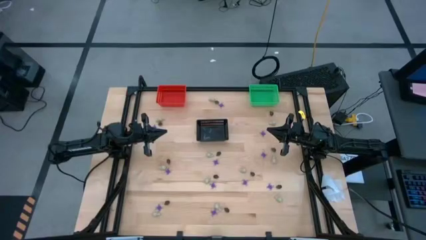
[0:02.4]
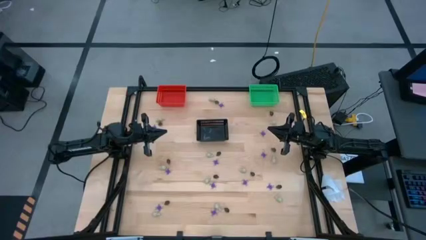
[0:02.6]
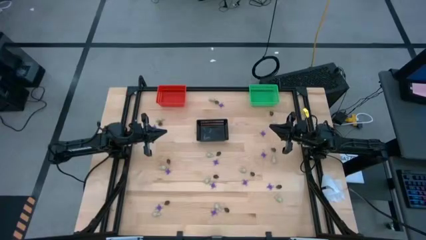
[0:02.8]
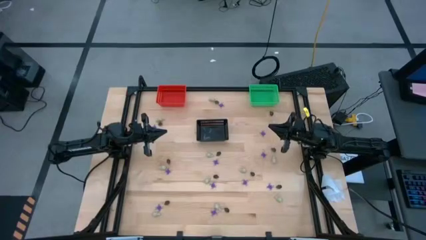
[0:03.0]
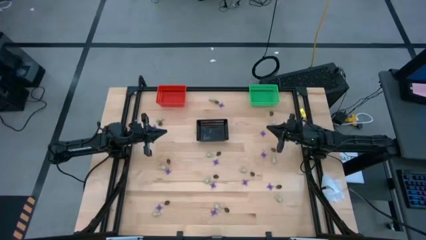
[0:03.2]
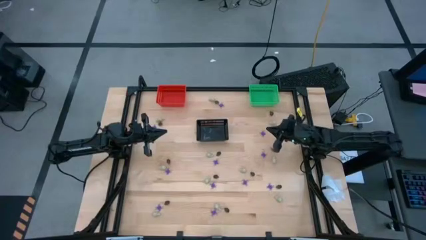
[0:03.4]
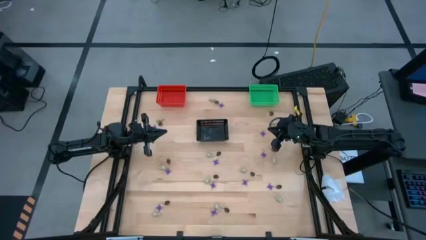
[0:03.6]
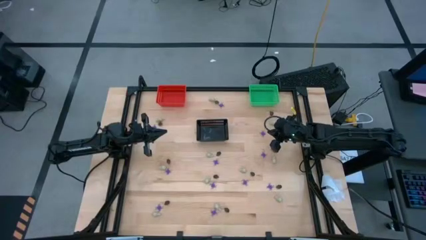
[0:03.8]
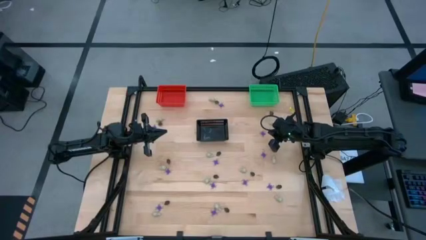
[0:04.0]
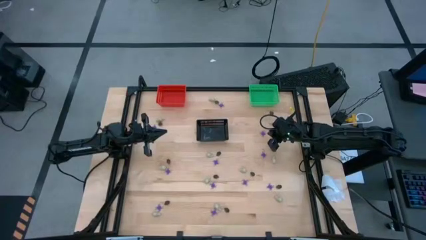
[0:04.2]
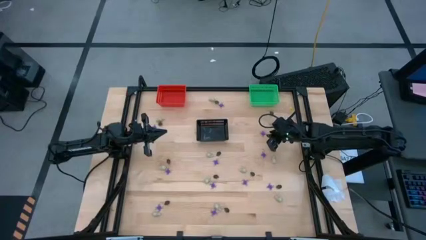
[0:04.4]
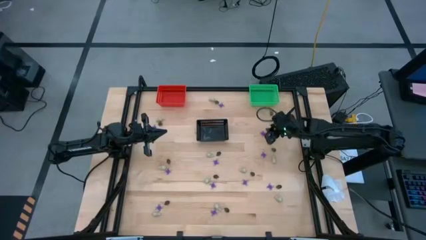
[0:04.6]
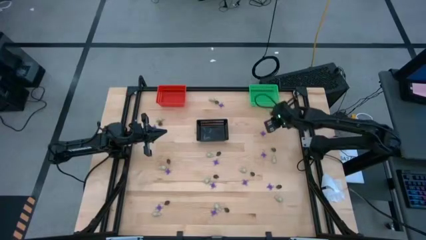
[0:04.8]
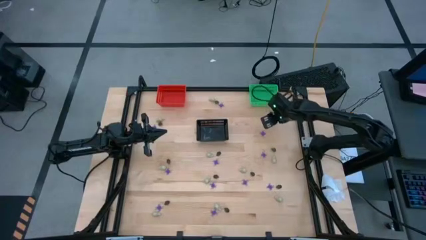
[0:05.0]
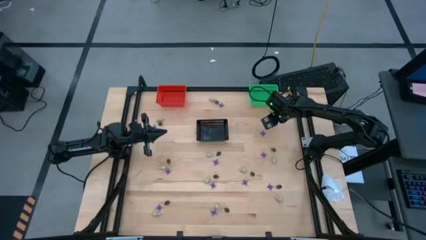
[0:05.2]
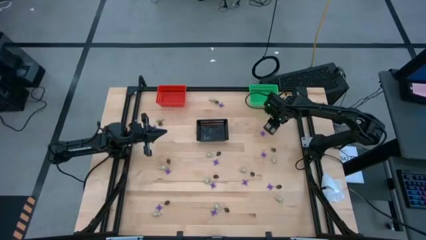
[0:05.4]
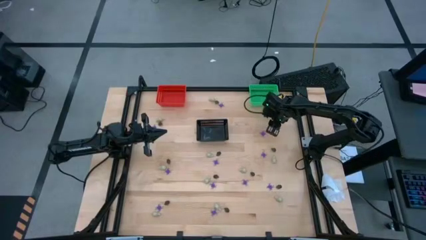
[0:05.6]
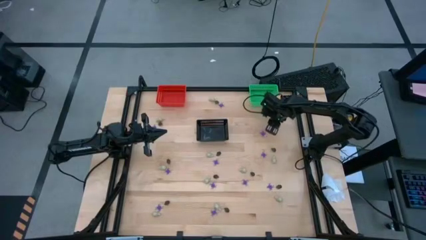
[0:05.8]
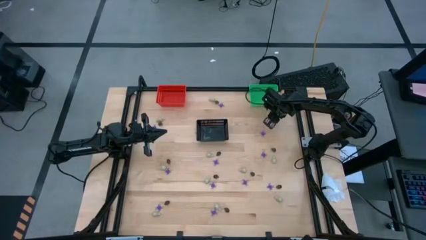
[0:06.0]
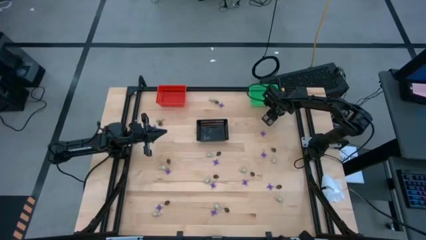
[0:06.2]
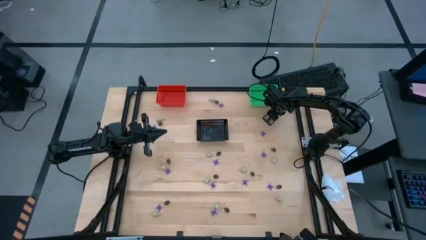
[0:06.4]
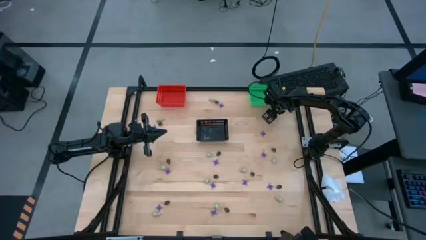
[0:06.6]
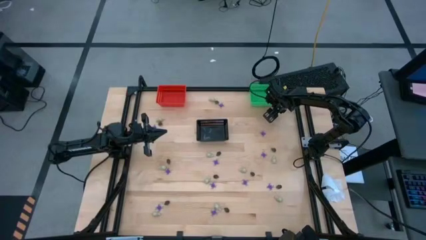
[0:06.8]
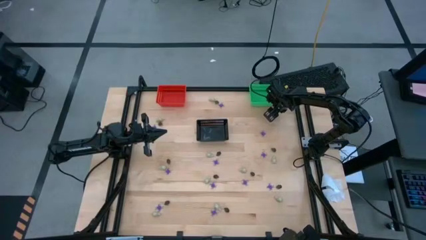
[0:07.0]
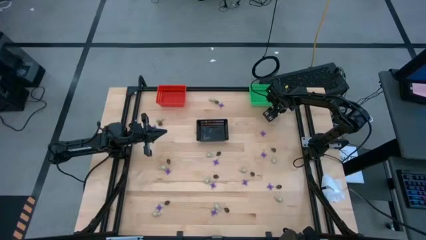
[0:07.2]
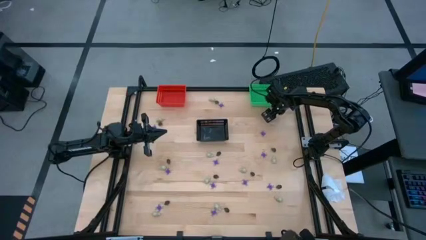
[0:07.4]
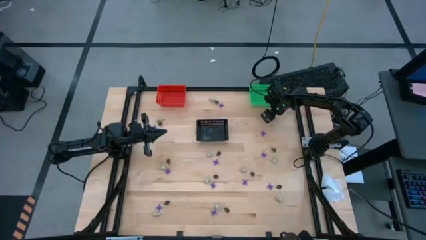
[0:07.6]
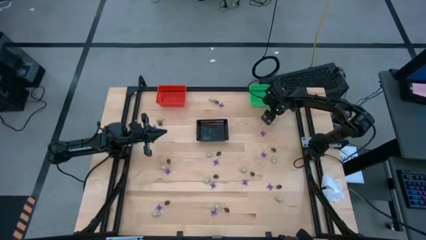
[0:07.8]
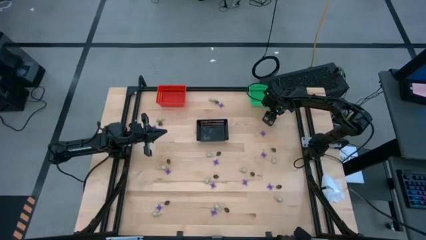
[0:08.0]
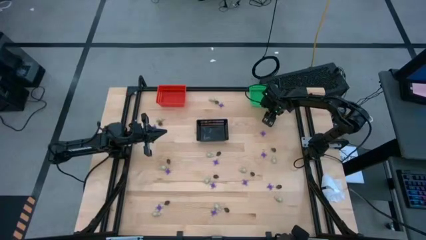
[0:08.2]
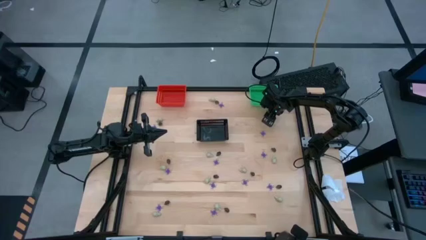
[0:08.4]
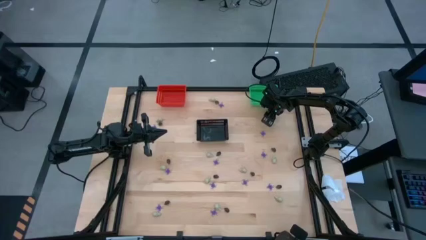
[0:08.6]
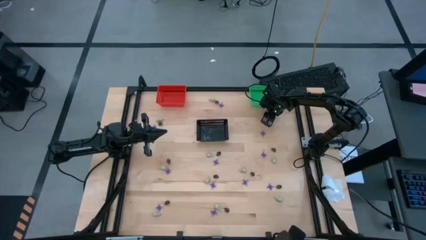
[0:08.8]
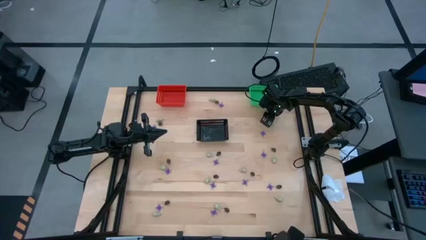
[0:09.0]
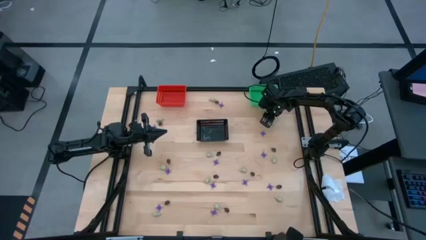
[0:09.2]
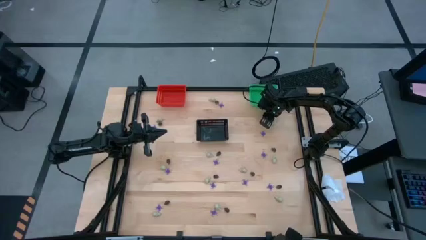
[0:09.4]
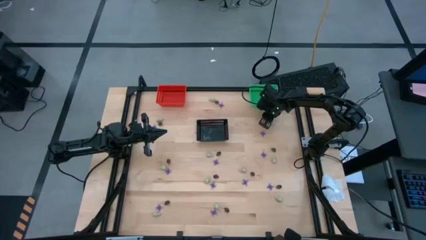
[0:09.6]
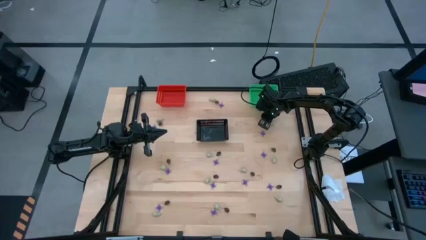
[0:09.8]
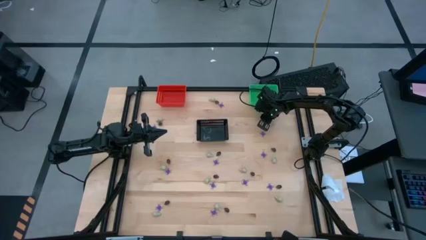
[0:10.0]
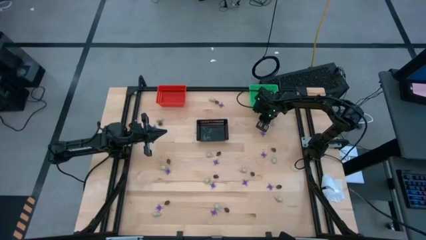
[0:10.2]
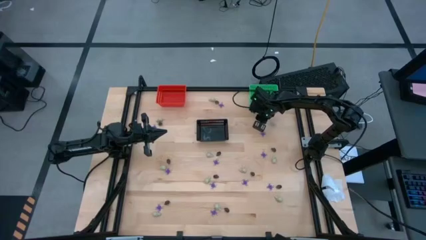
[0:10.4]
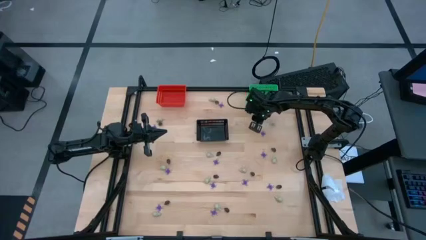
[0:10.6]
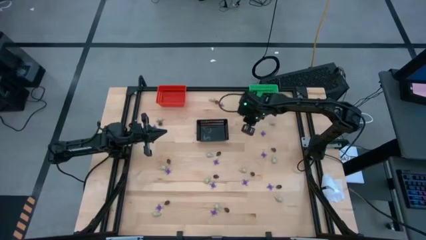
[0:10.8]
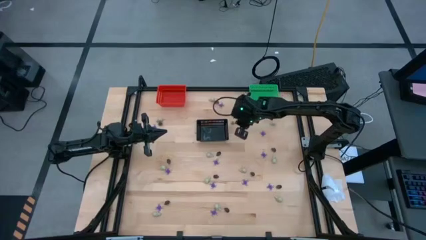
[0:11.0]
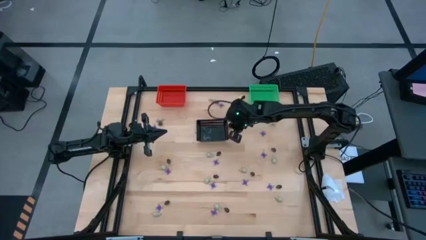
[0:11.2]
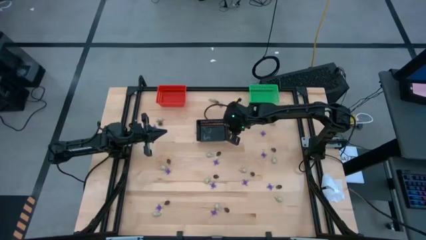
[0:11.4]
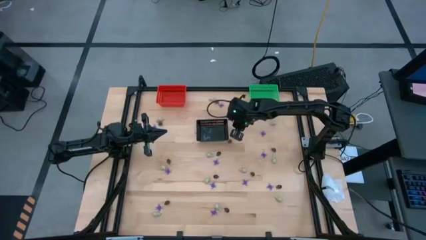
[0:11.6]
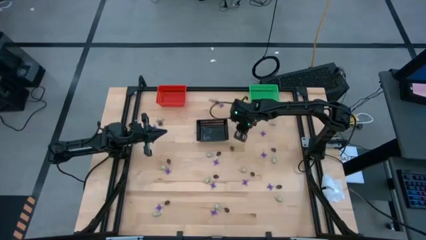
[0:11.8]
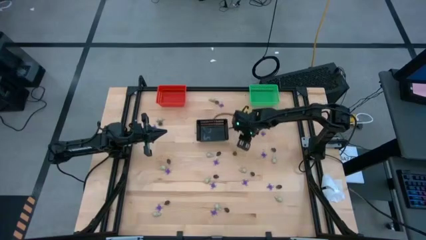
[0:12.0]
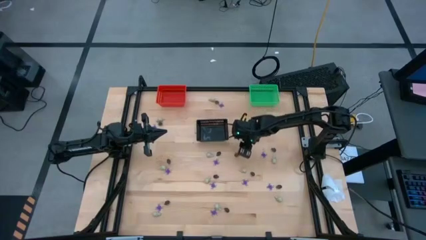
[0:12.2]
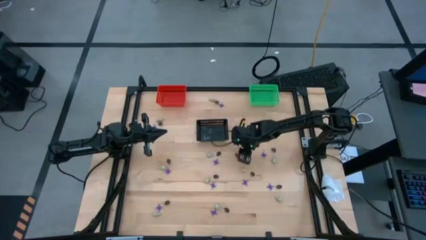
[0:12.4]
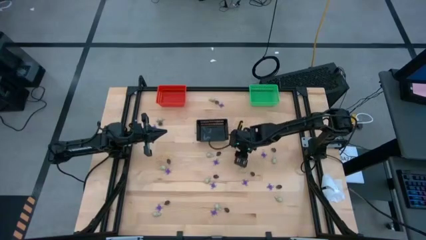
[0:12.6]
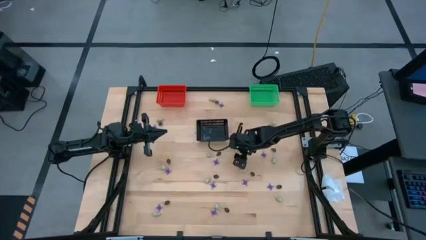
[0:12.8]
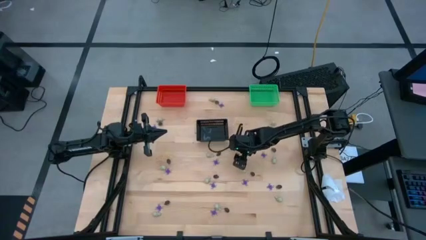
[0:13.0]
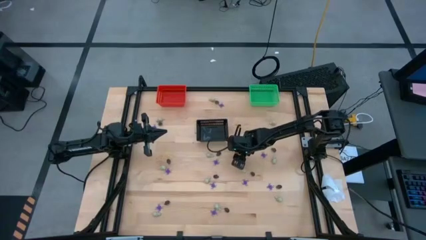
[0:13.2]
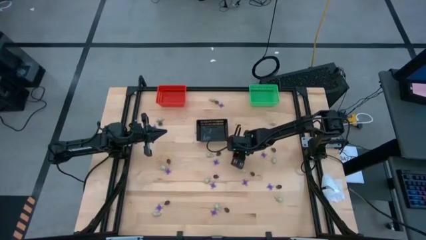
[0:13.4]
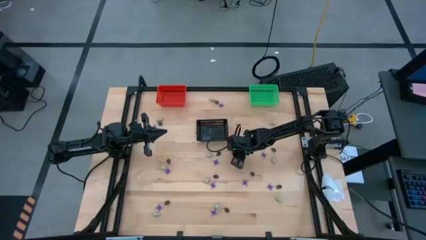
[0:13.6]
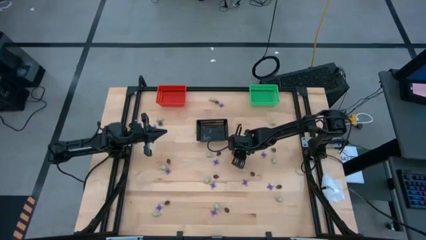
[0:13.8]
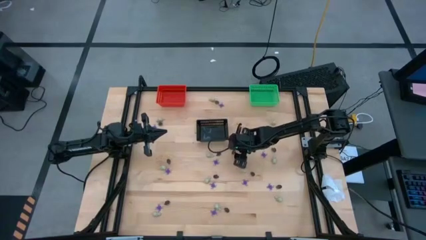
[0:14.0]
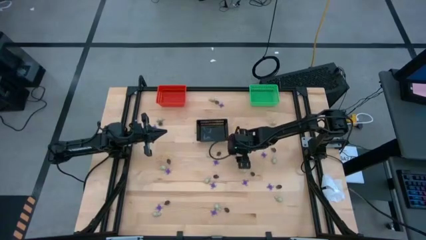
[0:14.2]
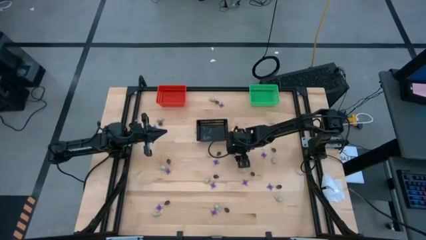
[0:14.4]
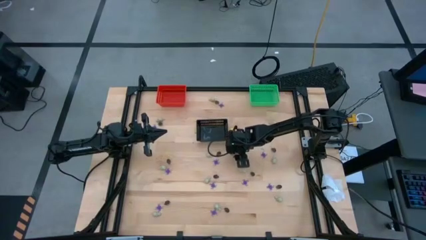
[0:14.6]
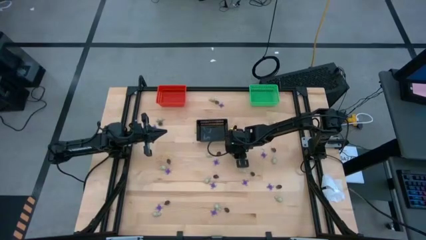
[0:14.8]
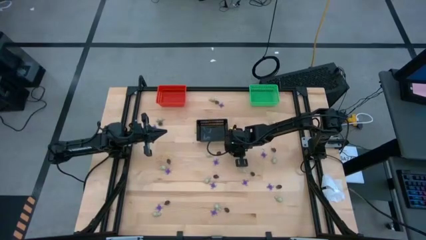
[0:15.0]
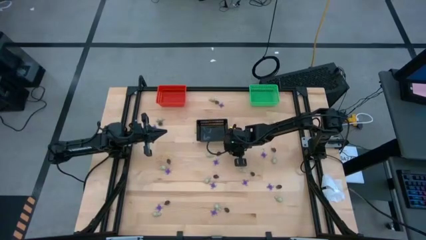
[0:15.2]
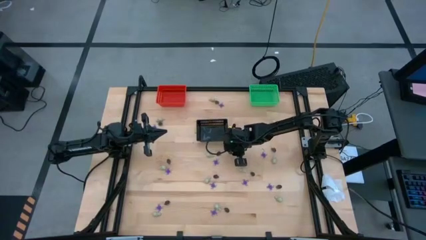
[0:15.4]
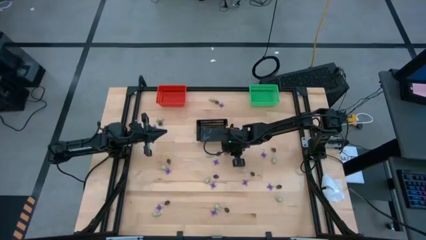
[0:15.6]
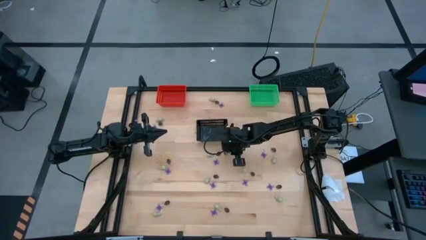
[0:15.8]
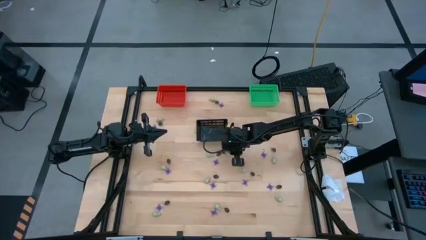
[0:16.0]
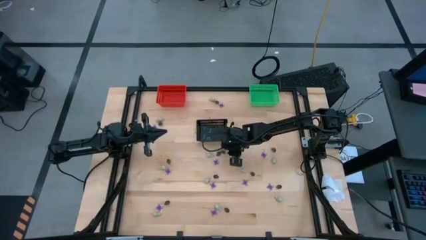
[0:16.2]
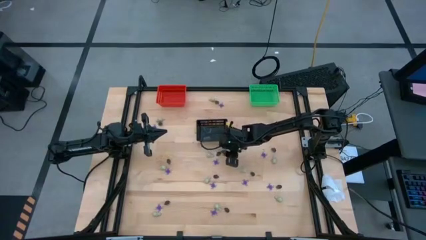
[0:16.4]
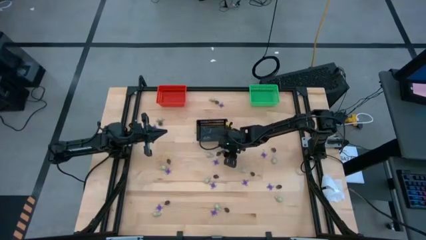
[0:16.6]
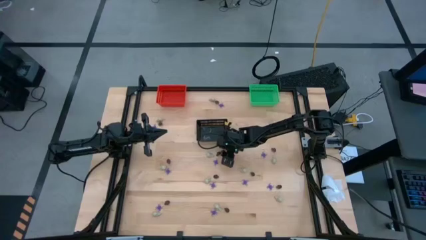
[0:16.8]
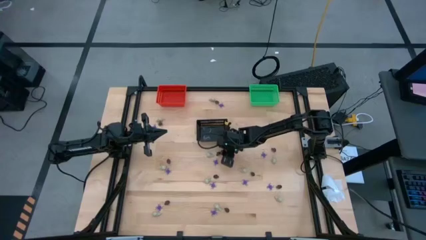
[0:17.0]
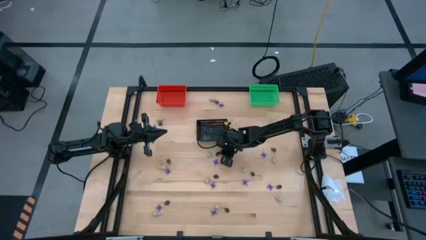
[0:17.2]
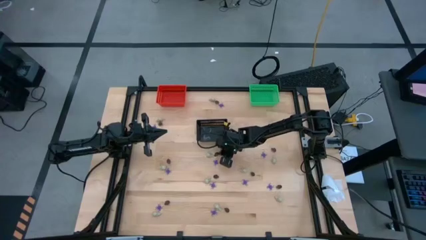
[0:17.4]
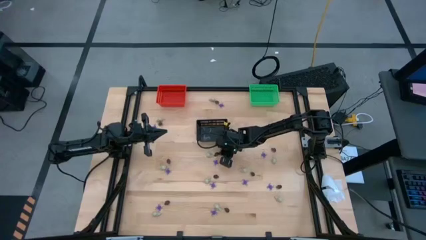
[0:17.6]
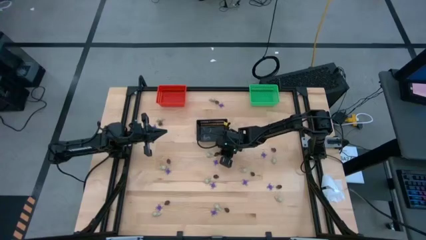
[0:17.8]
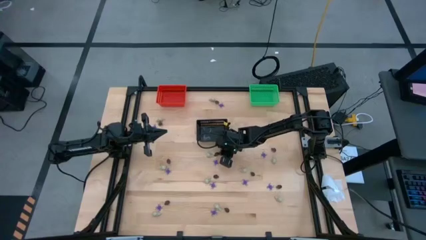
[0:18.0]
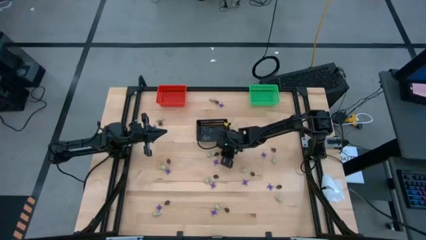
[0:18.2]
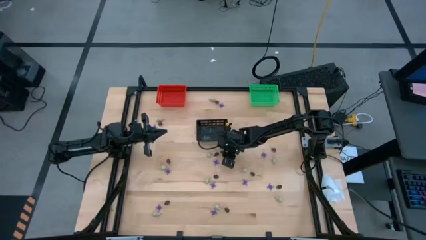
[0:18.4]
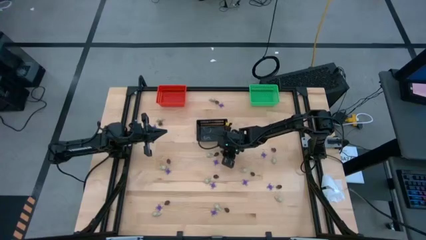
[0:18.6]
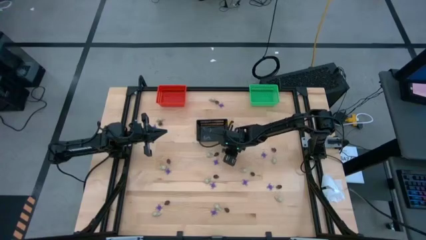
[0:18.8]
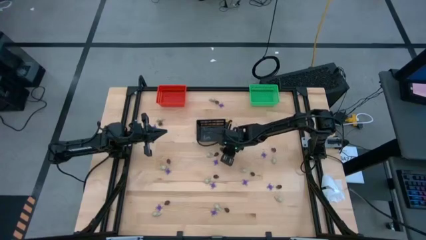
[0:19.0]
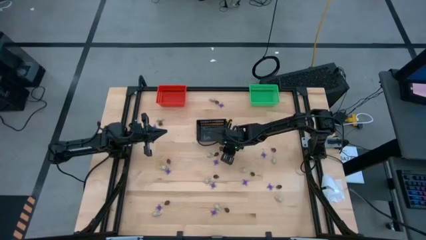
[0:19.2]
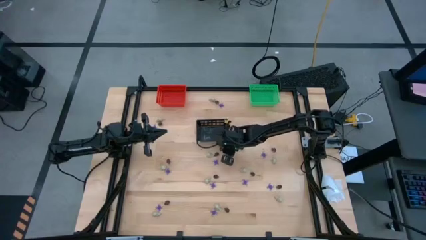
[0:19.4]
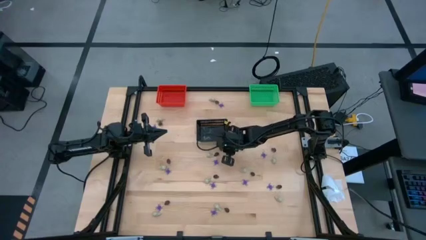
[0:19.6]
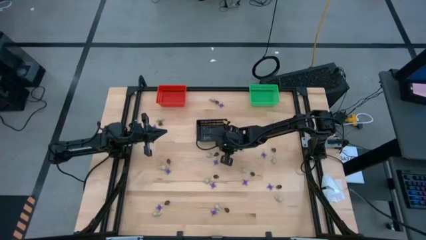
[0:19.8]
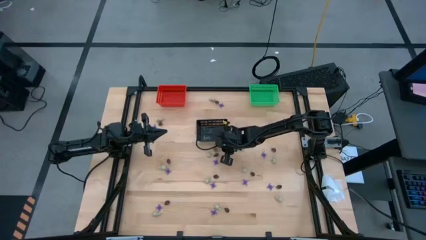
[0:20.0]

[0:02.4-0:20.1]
Task: Sort Halloween decoration
Put the black skull toy into the black bin
